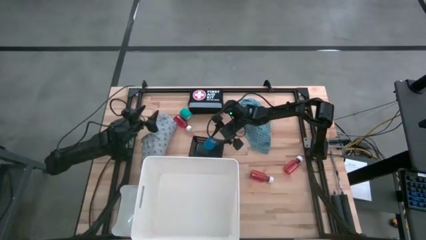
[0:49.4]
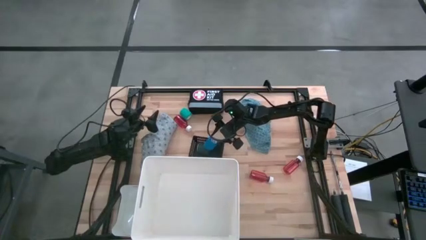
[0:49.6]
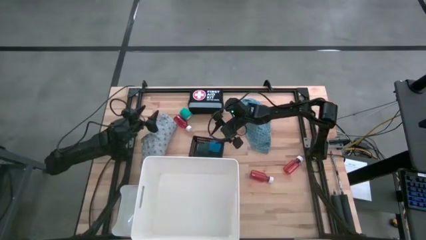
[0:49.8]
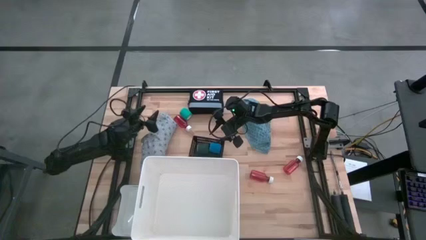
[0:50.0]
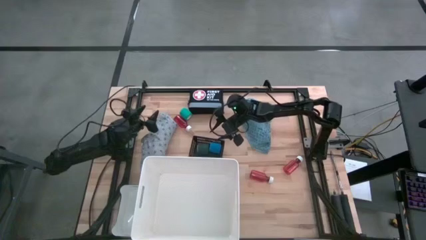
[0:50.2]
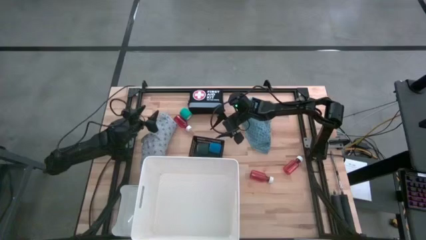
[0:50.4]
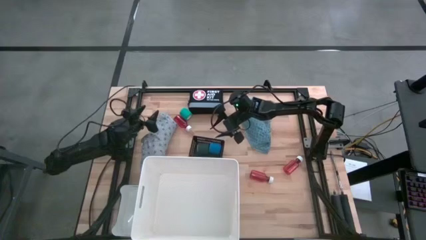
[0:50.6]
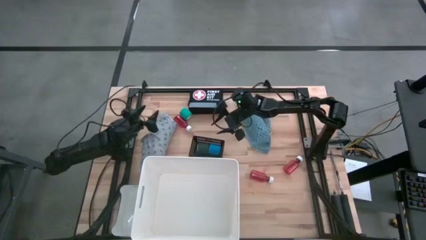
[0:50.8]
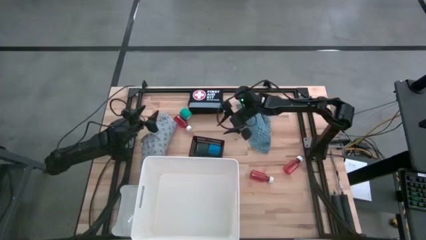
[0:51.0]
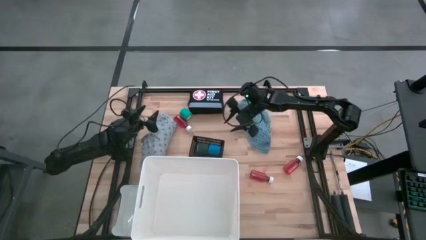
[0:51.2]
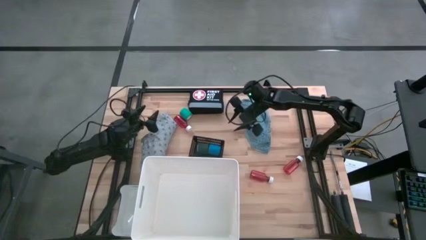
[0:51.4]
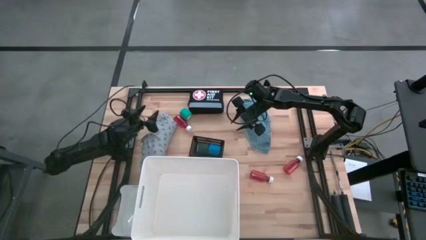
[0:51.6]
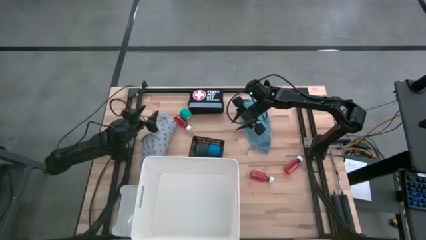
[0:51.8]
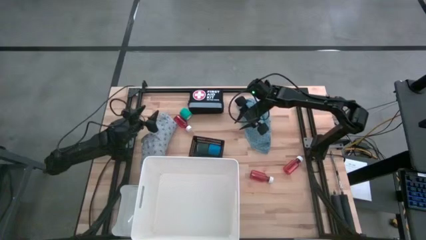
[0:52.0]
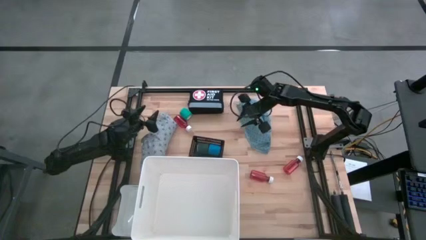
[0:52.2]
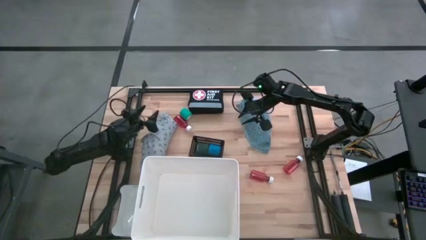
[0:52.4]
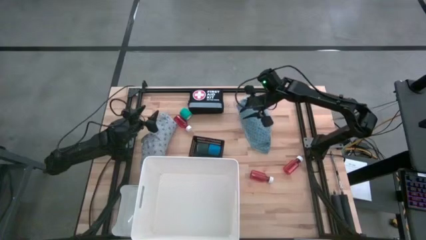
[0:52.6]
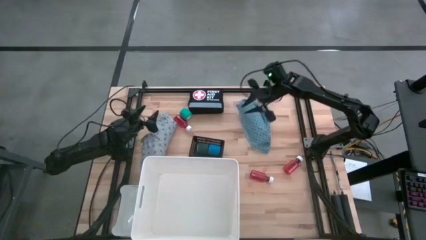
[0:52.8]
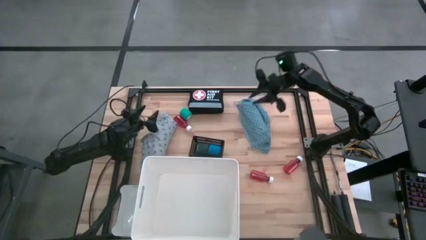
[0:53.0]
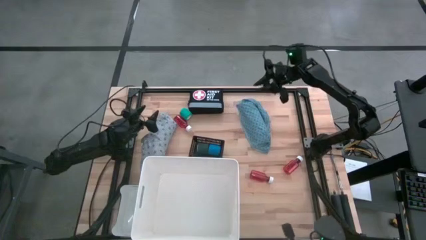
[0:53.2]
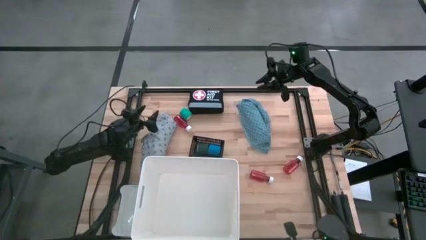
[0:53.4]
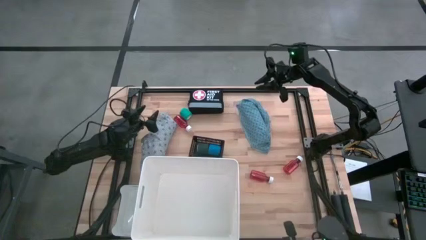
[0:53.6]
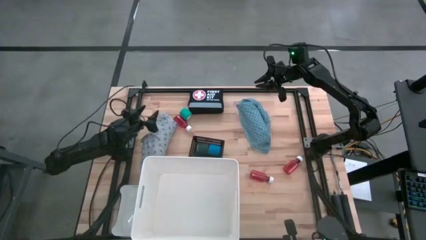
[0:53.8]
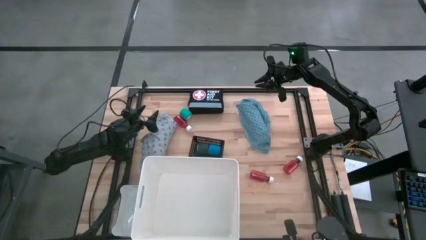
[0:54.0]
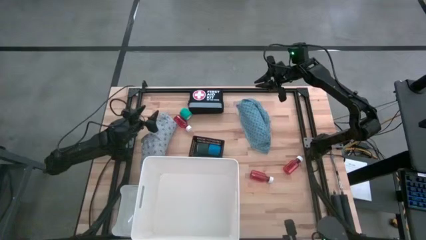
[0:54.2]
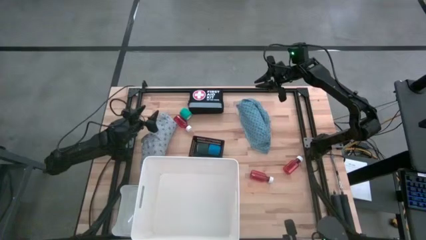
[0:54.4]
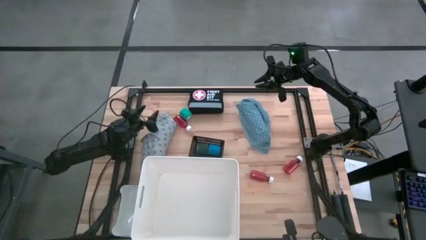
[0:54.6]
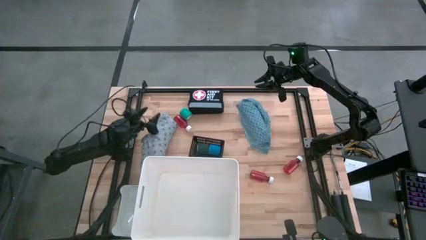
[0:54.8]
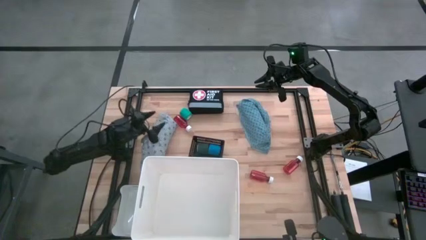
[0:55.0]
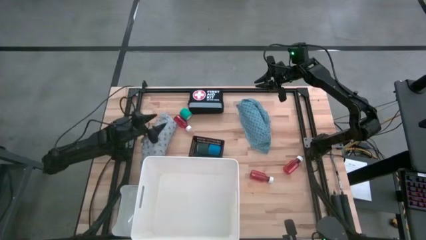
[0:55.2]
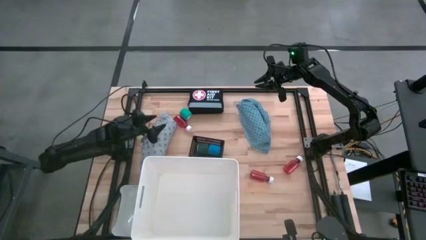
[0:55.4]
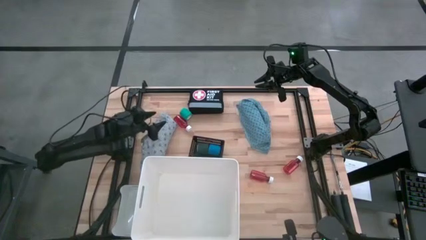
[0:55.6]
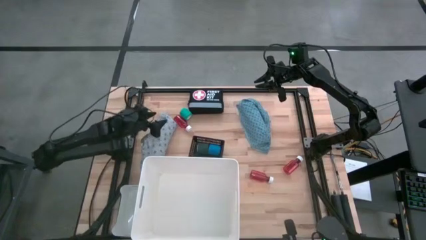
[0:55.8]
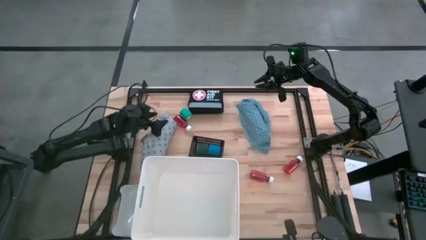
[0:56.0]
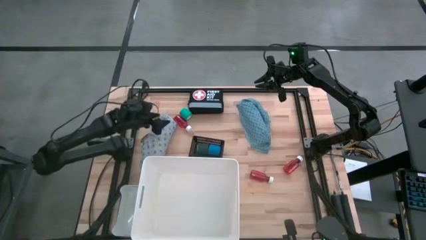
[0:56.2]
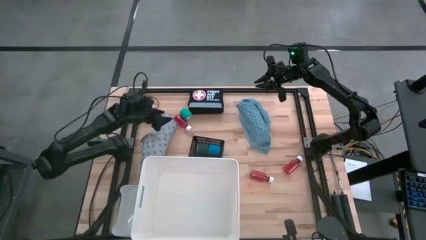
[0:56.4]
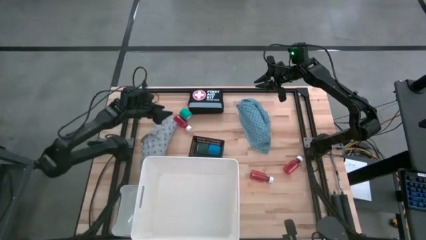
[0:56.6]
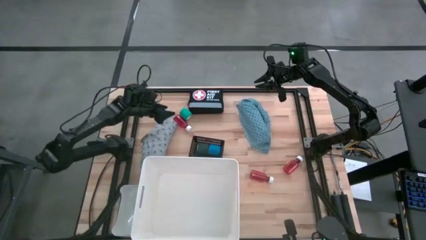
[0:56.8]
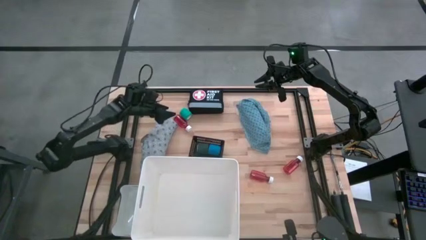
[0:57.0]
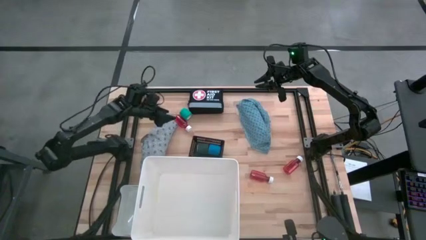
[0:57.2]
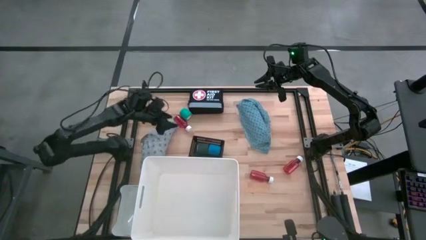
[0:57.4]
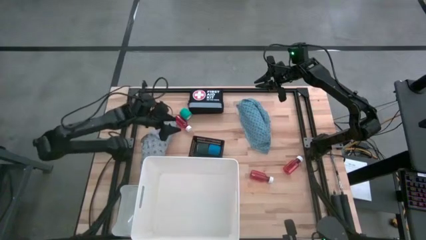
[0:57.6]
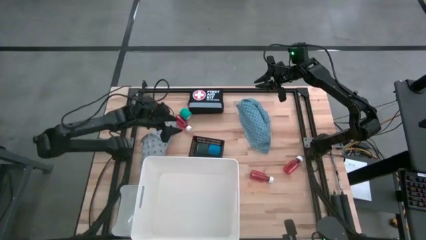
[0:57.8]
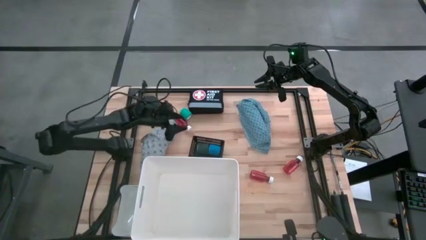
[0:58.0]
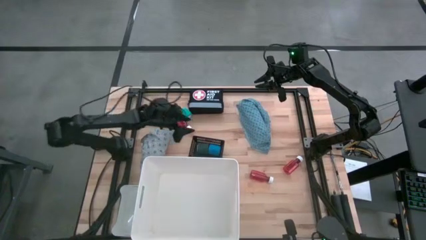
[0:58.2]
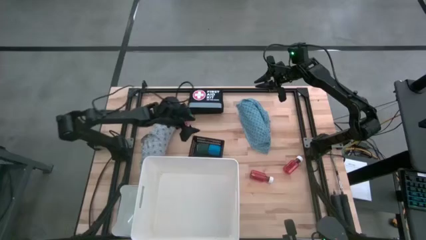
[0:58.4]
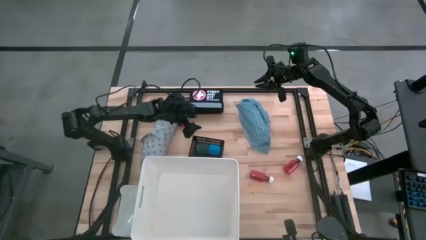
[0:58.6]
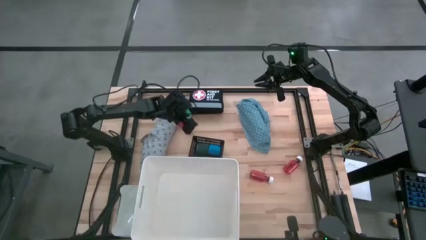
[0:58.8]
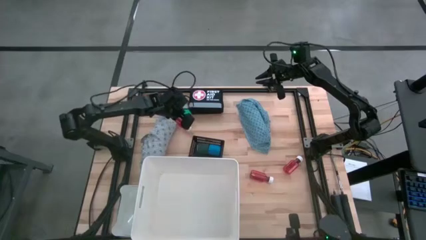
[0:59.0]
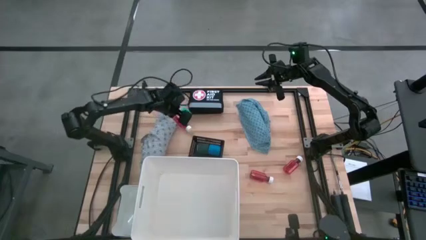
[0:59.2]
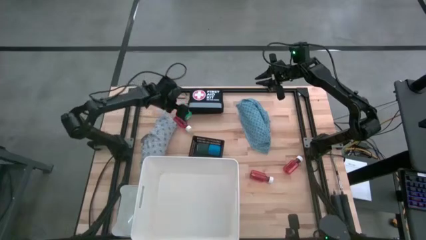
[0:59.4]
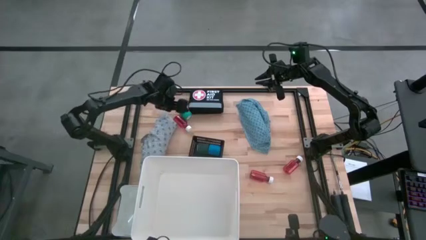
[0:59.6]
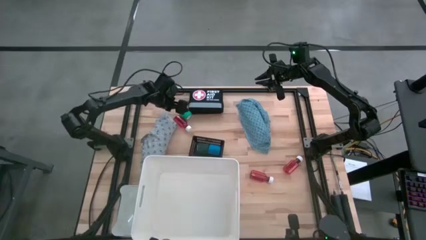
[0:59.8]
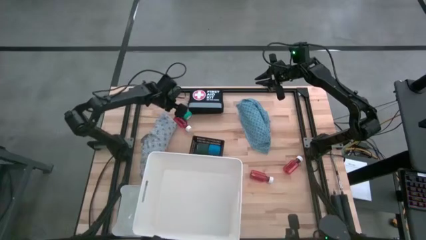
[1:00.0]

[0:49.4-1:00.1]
Task: Pick & Place Medicine items
Put the green bandage into the black bin

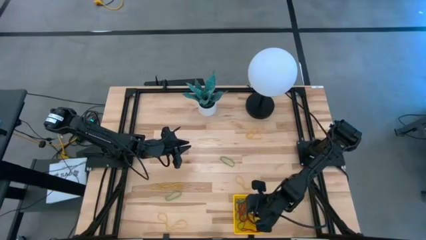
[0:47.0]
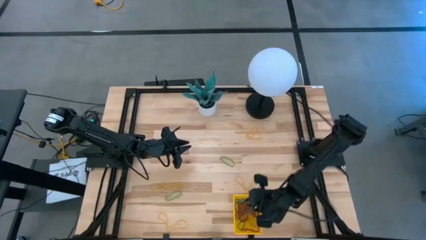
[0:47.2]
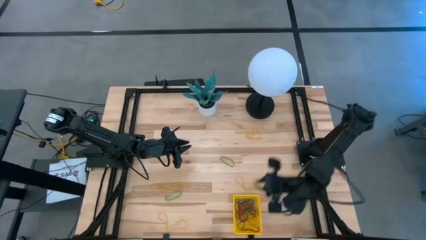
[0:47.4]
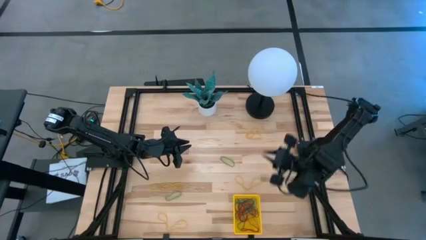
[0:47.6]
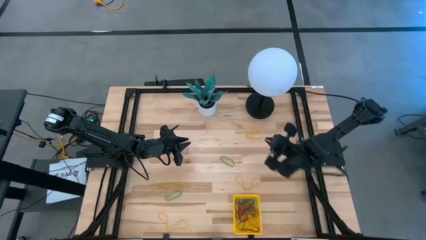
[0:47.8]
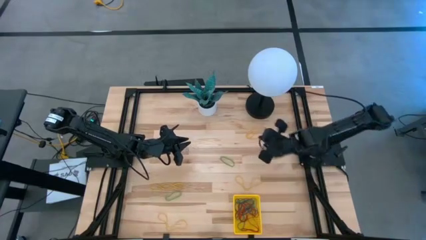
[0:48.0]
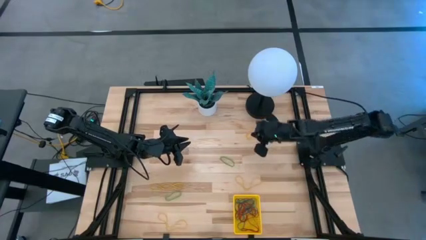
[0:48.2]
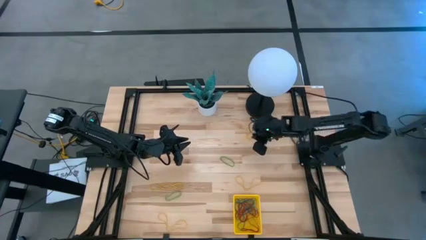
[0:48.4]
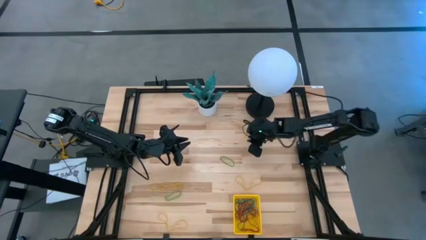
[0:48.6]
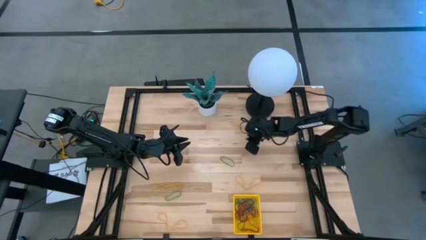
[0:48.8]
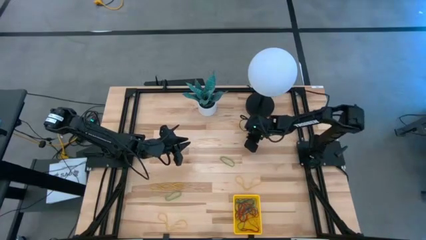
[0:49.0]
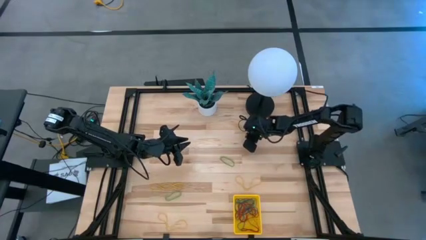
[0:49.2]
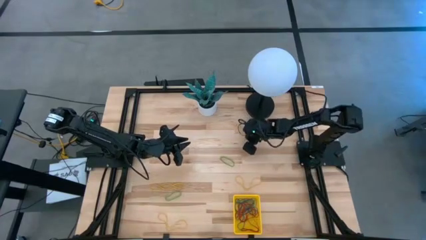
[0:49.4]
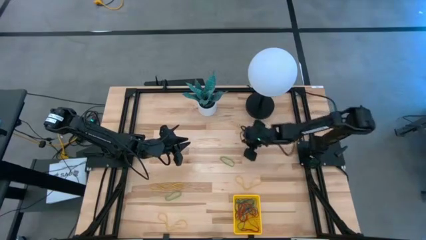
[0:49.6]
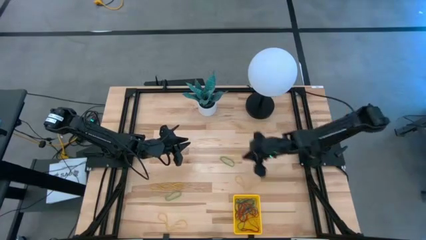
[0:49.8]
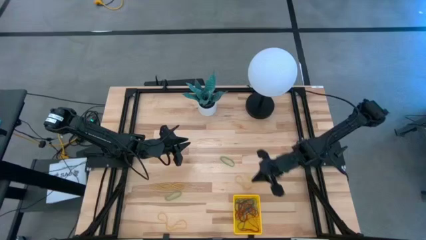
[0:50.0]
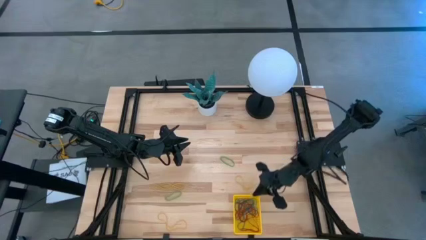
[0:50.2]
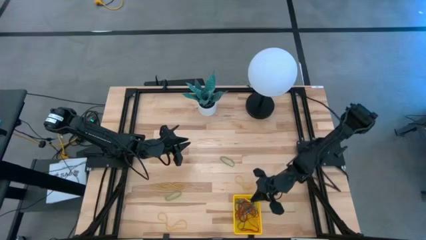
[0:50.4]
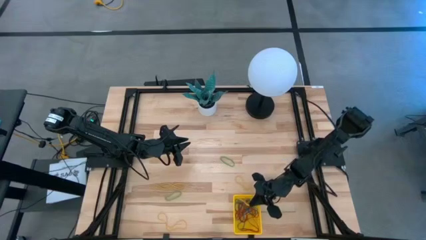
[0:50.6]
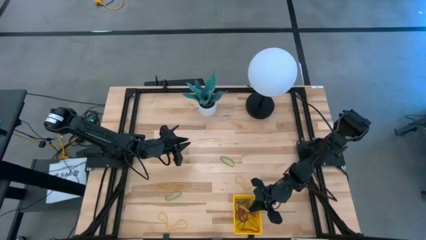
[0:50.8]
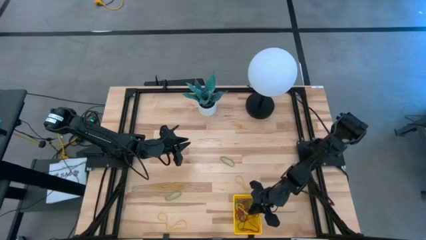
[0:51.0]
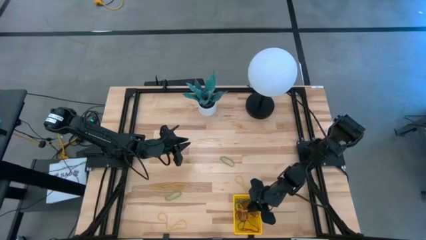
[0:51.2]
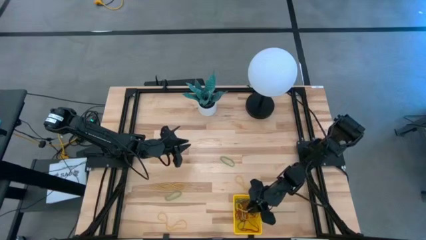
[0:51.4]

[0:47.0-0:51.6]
Task: Pick and place rubber bands into bin
Put the yellow rubber band into the yellow basket

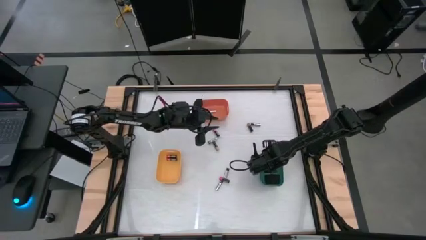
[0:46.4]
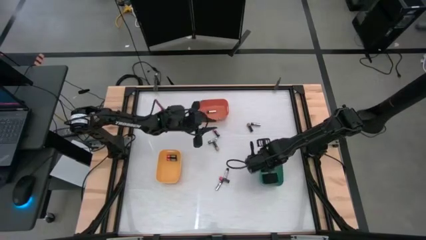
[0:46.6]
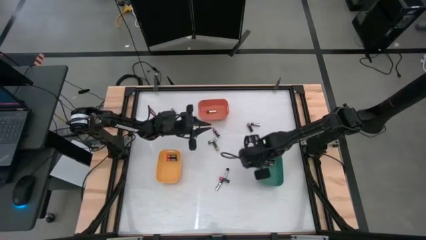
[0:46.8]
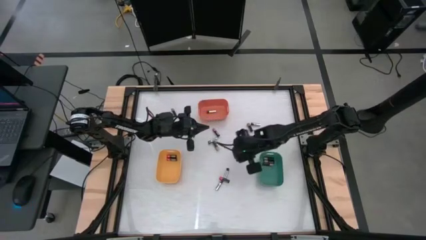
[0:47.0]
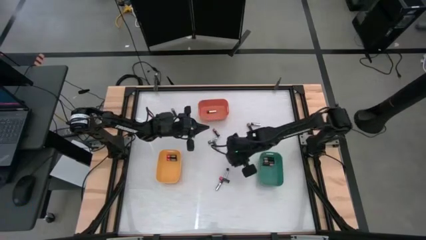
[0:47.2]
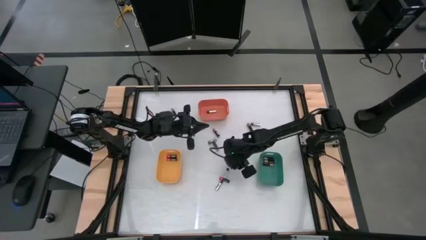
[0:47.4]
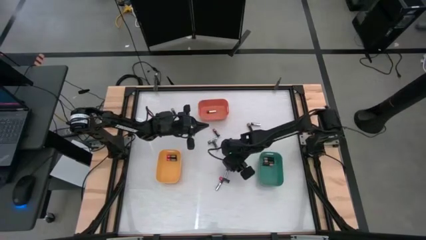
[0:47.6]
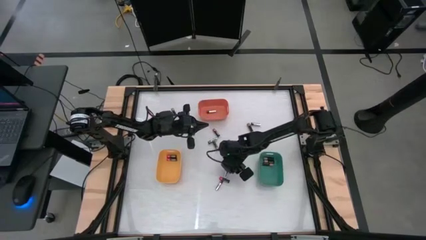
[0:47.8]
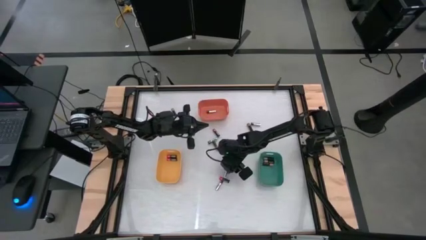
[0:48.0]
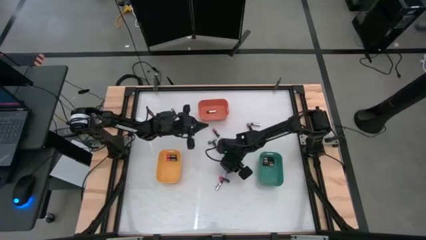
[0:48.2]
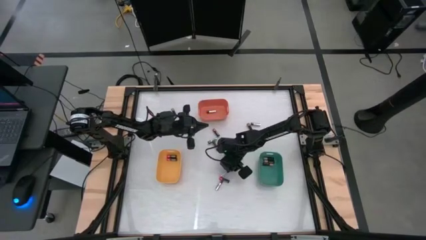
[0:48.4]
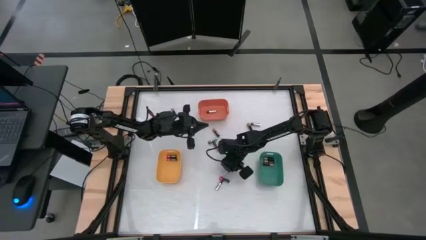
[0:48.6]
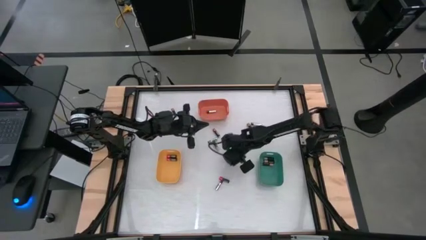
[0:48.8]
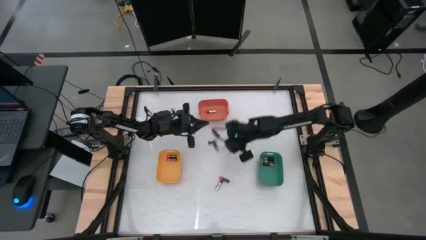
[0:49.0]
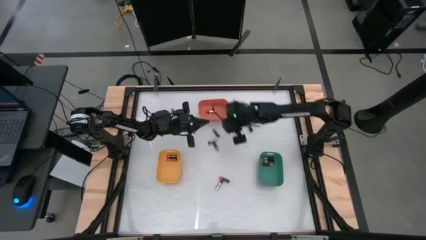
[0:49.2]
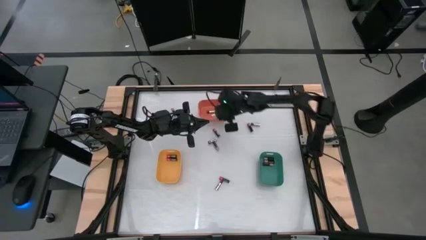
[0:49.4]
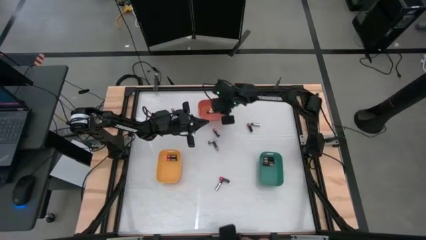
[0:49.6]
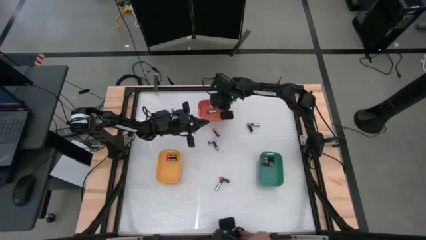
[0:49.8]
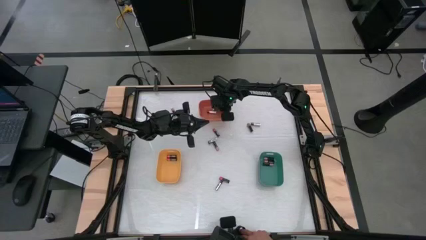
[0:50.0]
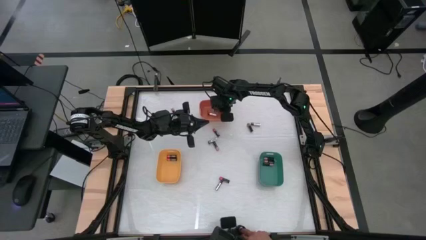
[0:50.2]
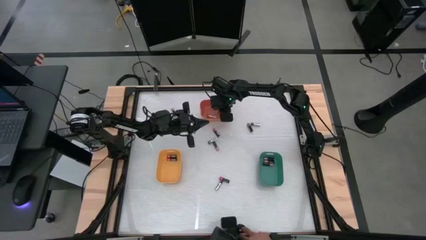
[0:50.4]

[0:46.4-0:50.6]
Task: Sort batteries
Put the silver battery into the orange bin
